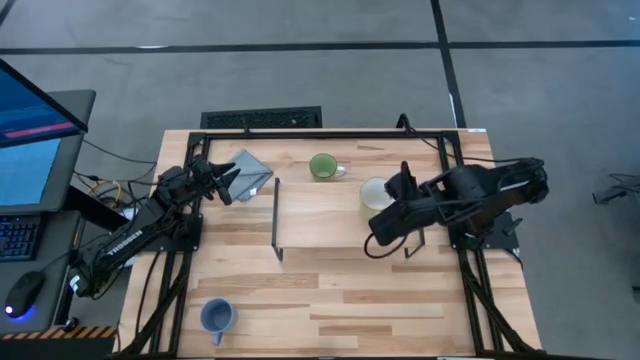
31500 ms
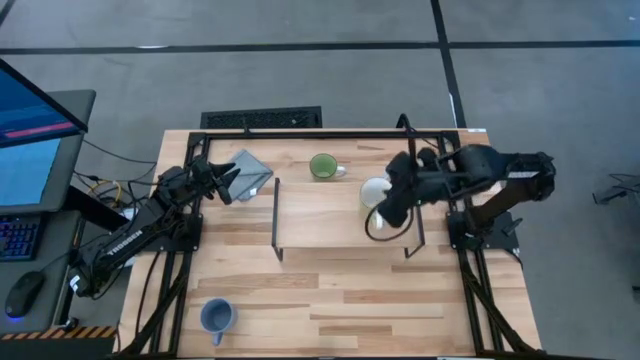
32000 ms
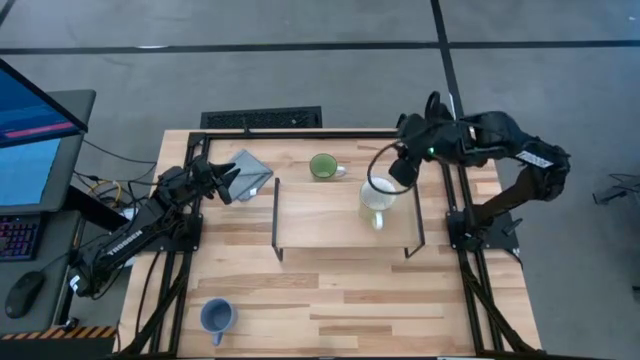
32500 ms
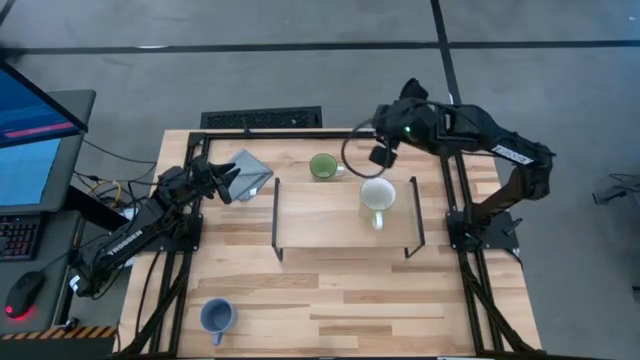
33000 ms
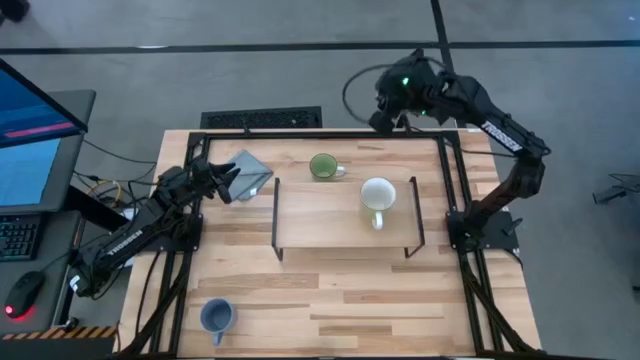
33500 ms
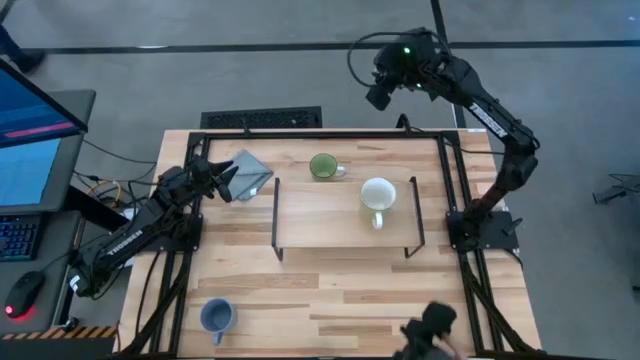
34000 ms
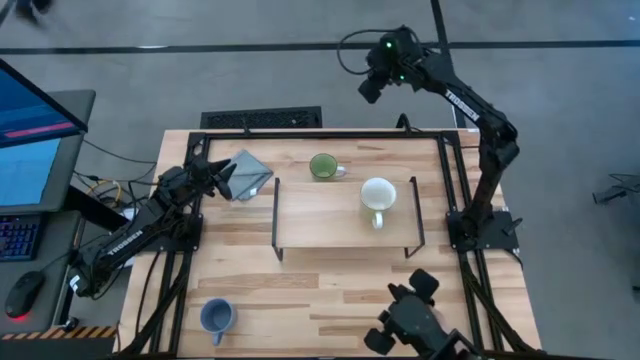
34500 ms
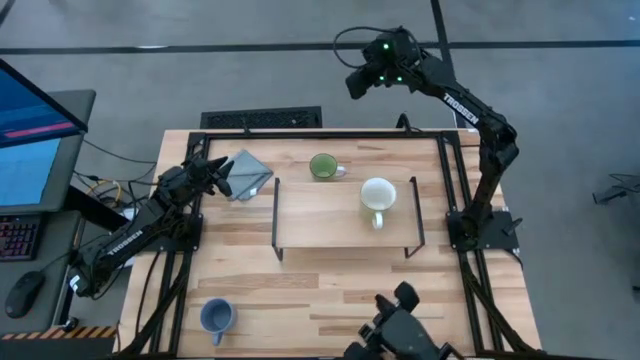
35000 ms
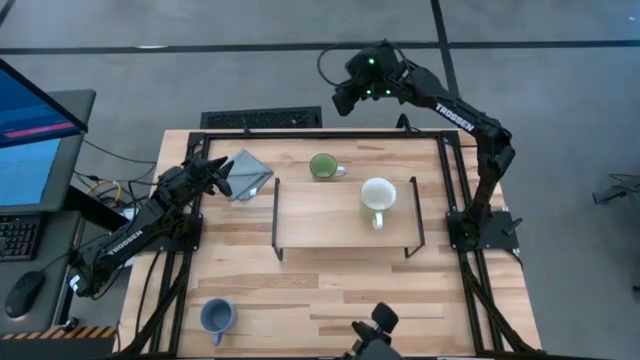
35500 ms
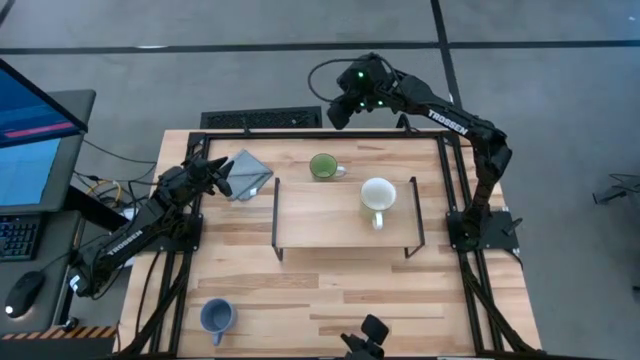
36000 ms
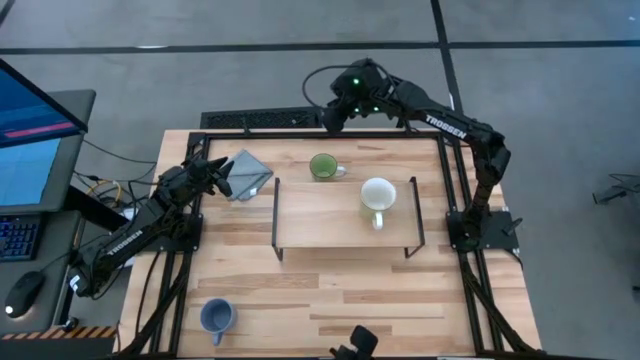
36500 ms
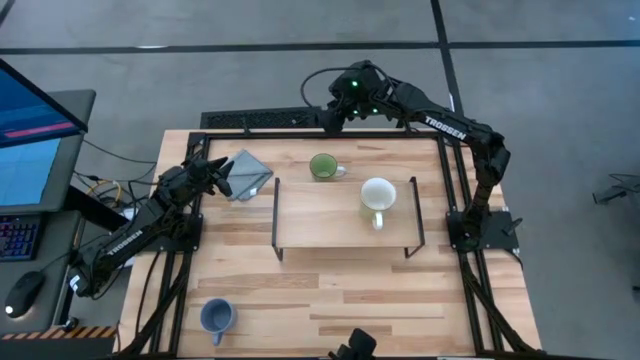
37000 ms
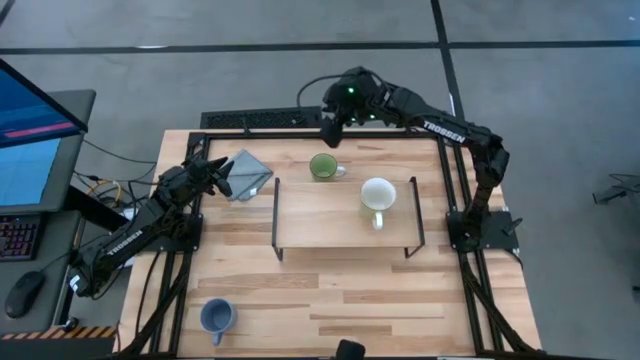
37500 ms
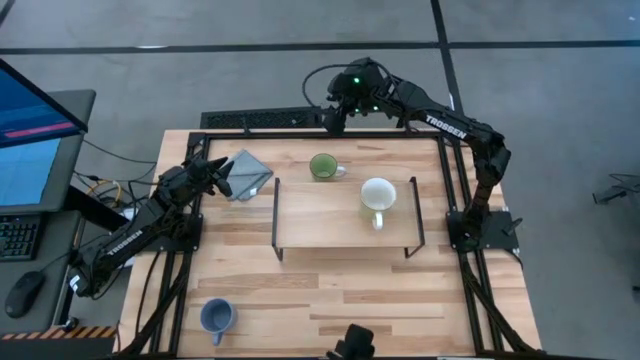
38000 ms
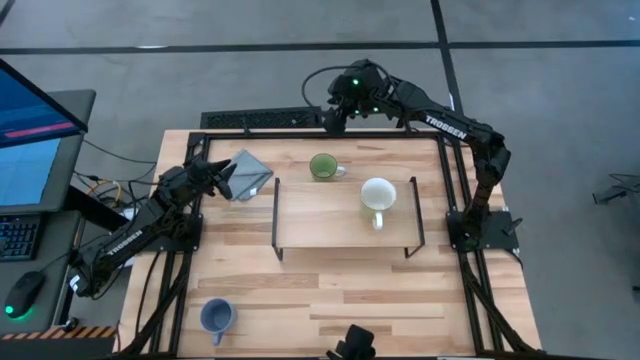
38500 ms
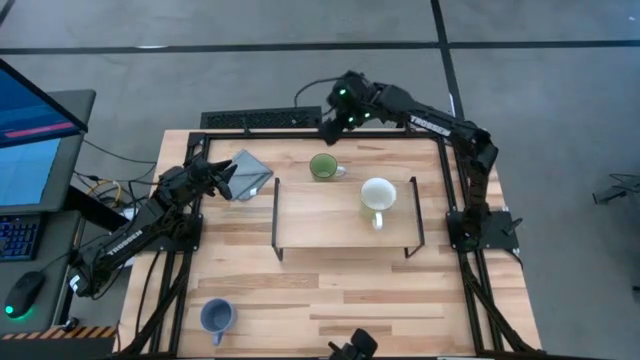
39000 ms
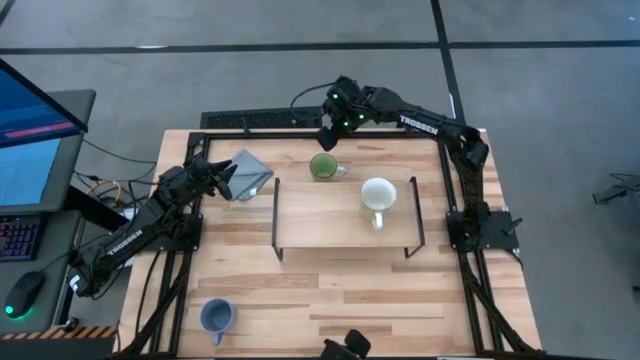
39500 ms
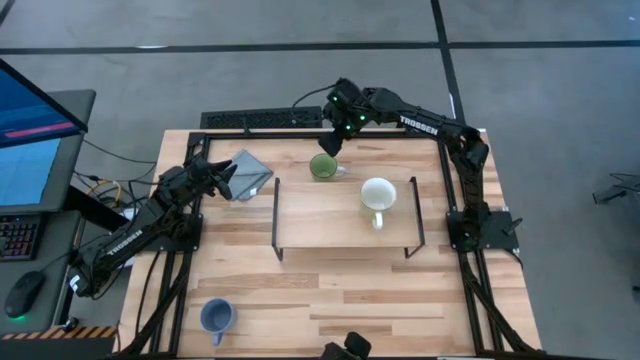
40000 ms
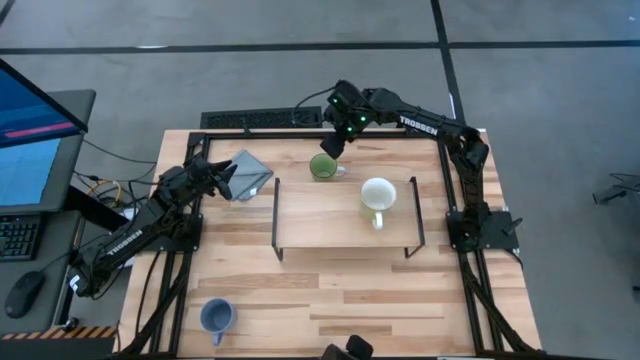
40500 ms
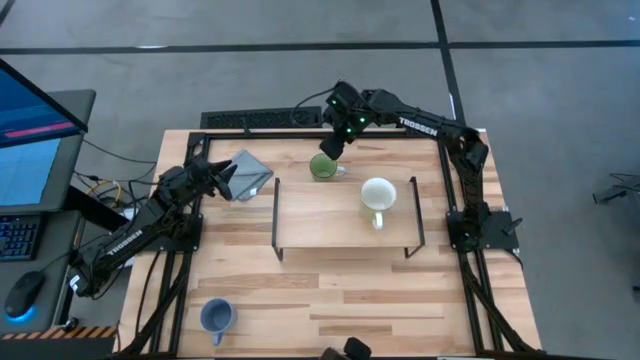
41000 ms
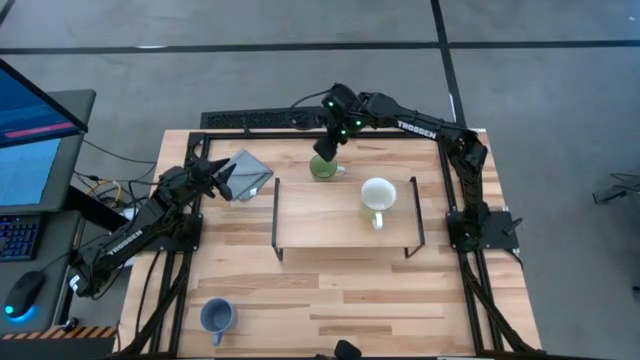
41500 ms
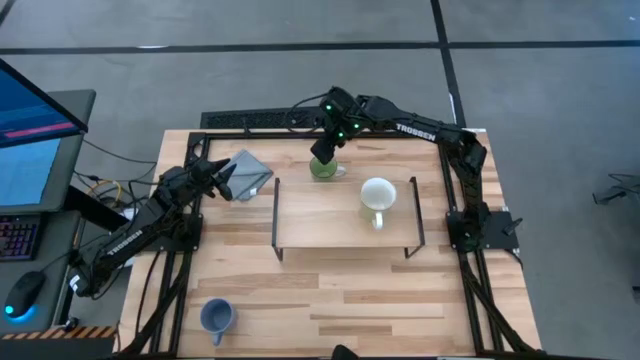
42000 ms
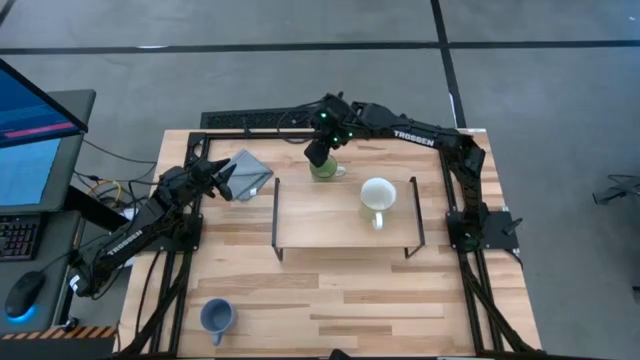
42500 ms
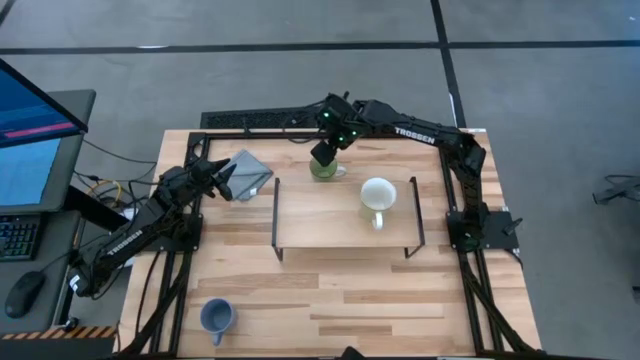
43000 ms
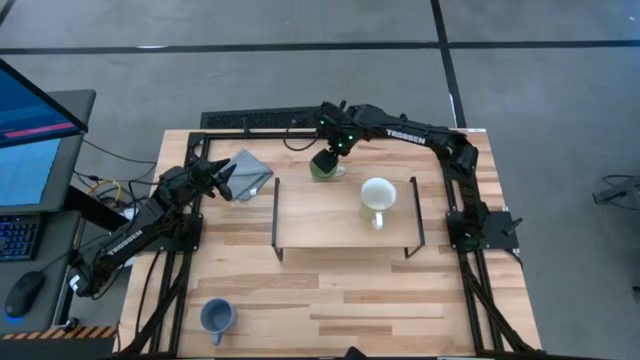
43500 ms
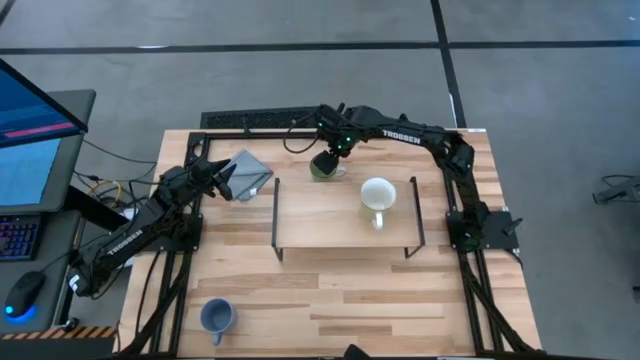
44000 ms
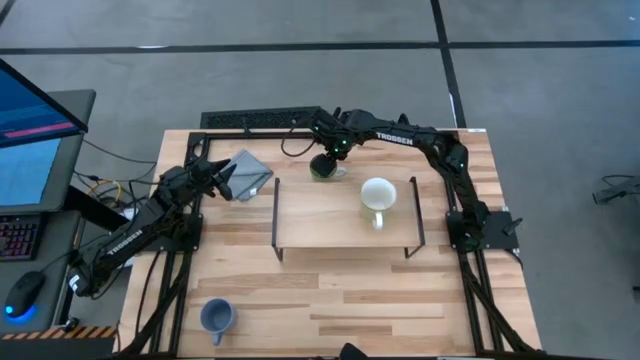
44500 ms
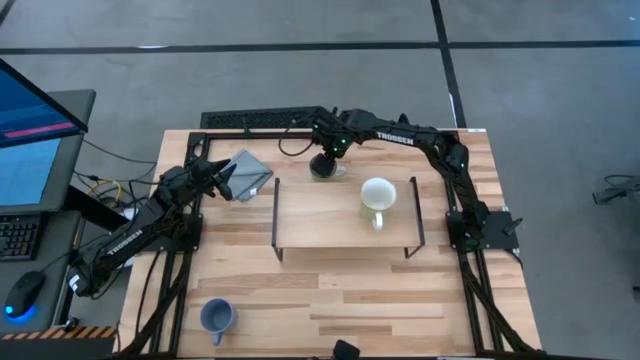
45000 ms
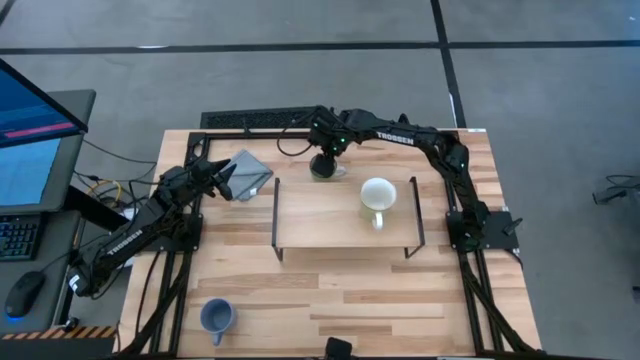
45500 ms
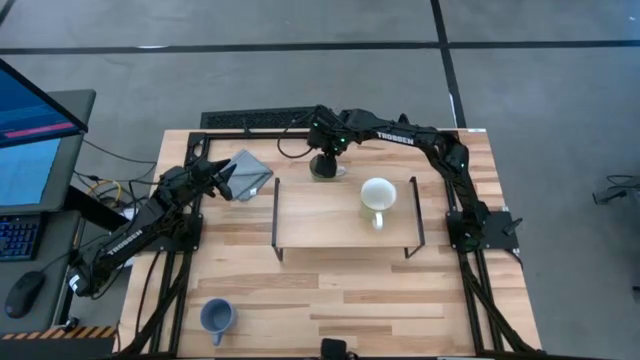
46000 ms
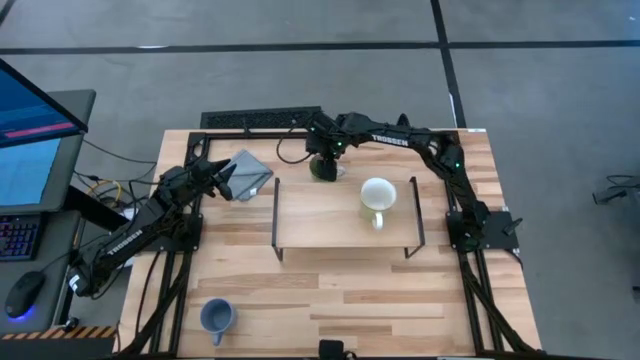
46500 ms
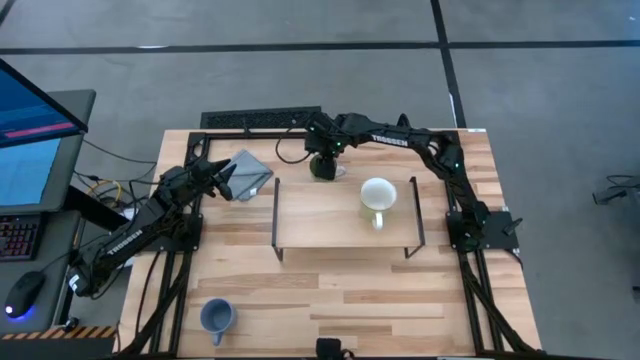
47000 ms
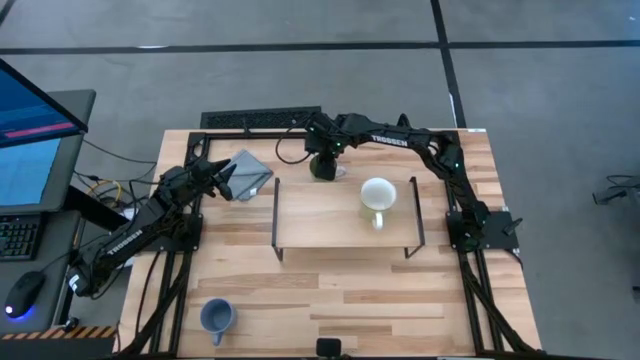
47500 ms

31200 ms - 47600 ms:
Task: Stack small to large cups/mugs on shelf
Put the green mug on the shelf

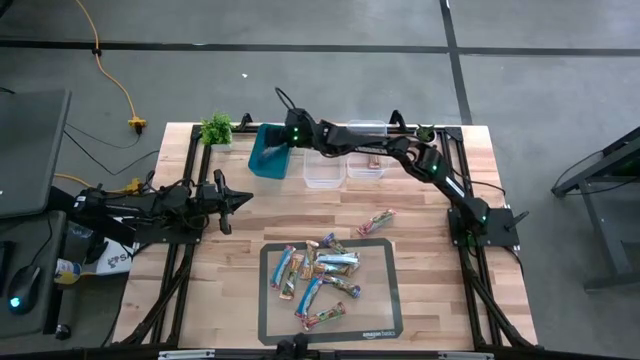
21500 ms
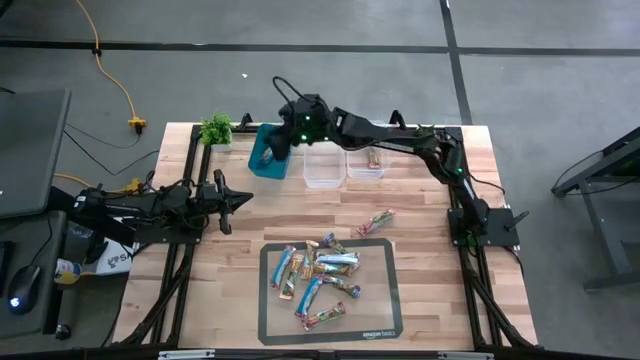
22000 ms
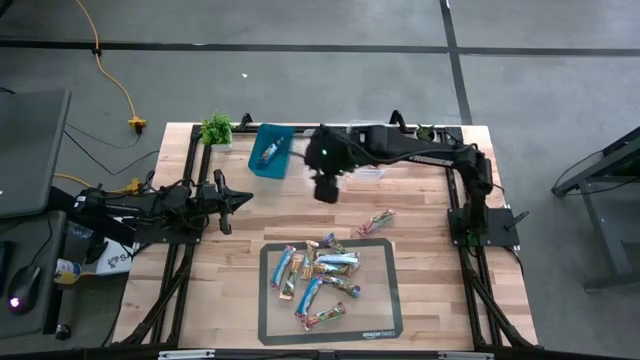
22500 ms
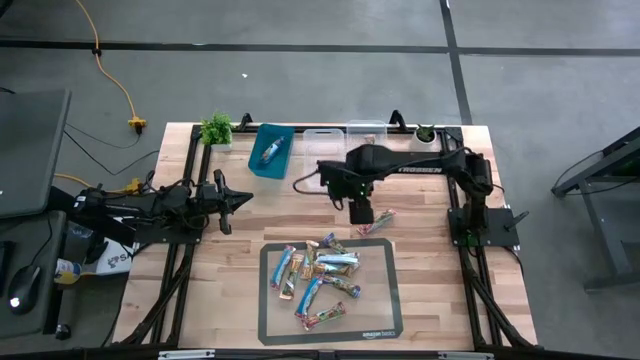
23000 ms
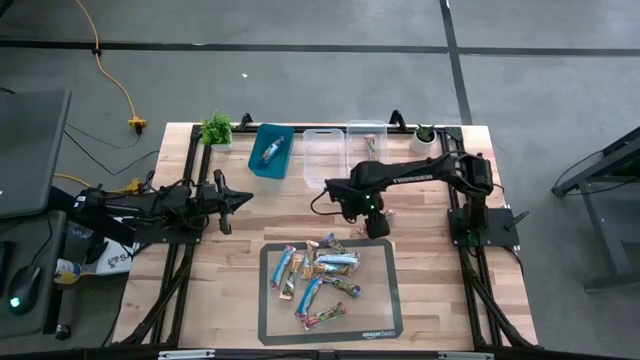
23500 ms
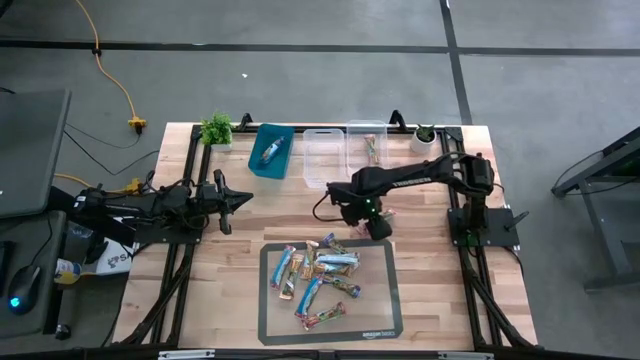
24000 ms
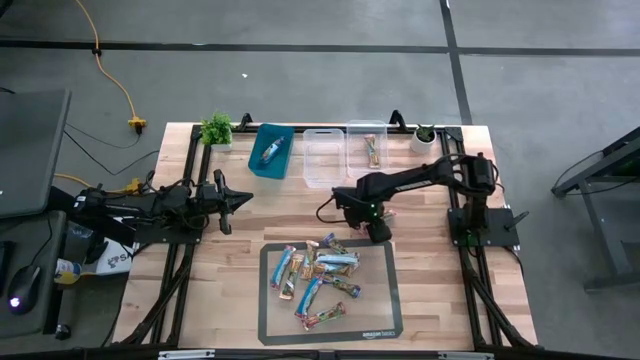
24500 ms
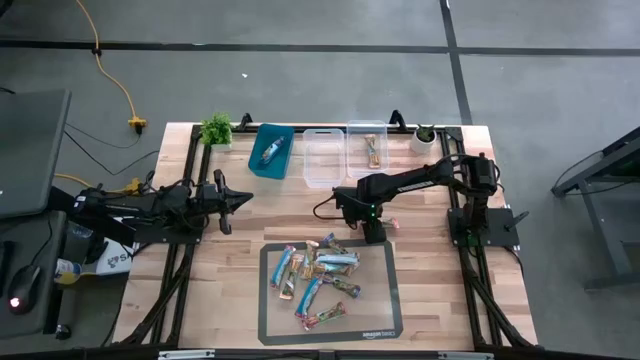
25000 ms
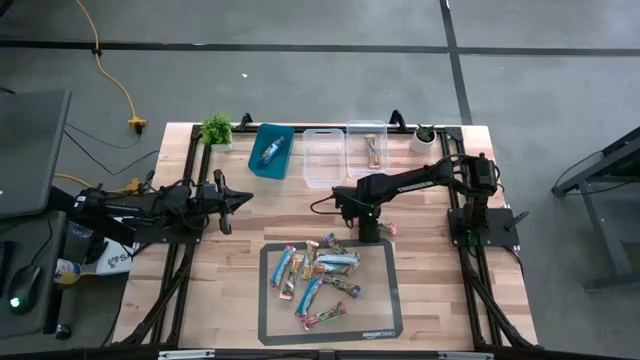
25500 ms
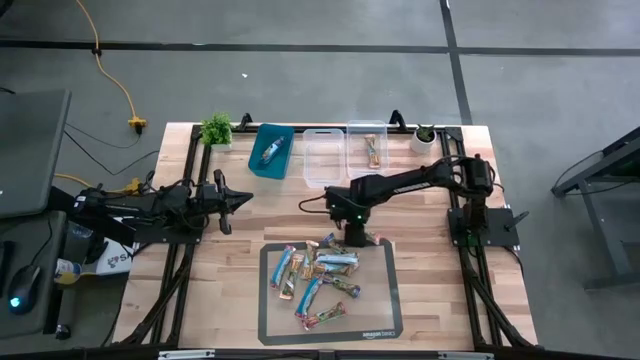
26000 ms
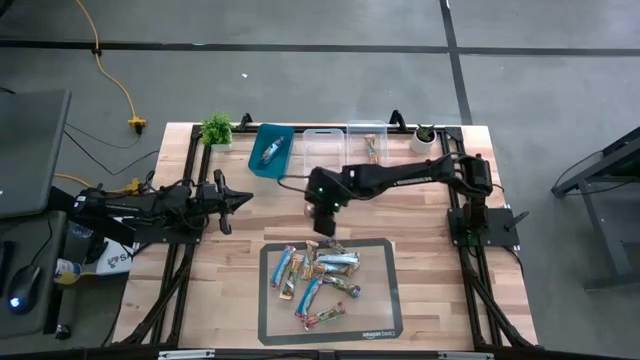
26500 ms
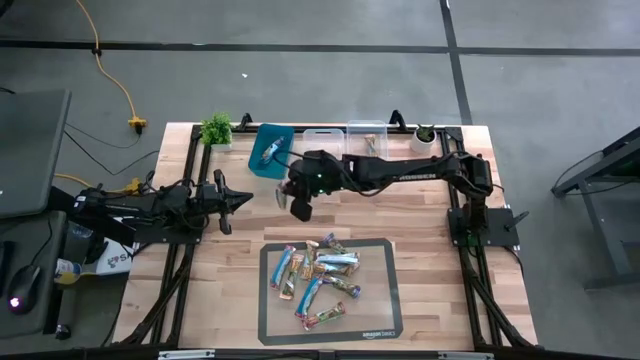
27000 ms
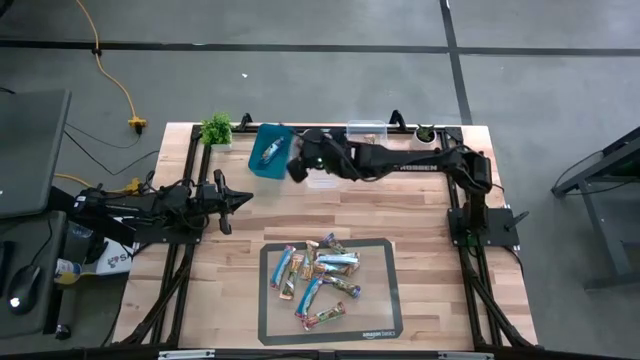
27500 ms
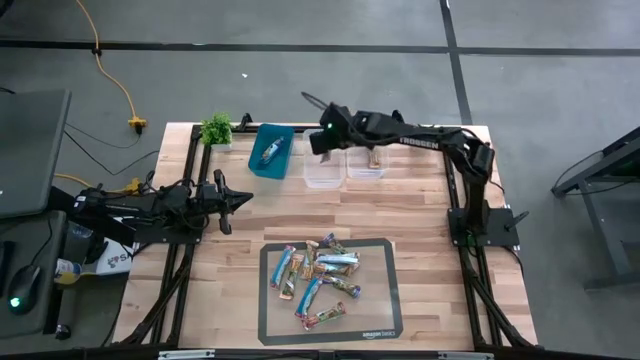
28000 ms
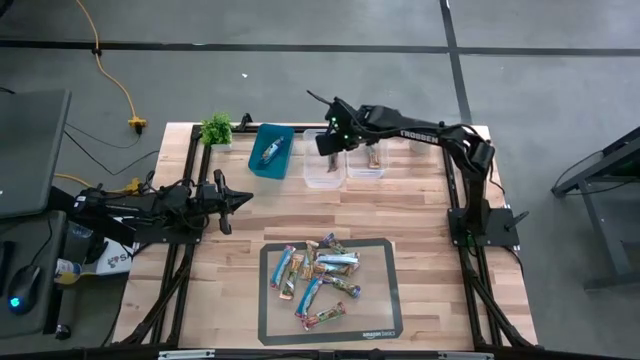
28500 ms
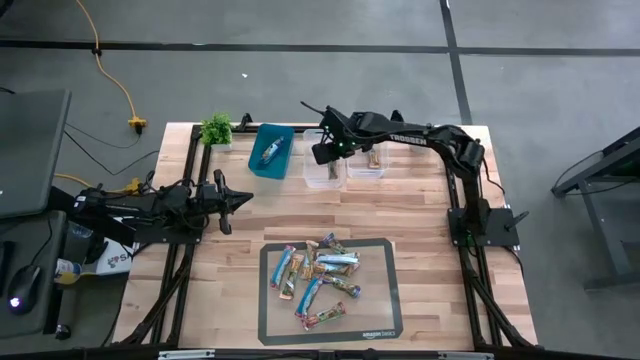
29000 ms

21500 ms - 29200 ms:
Task: Pick and place Granola Bars by type
Put the red granola bar into the left transparent bin
